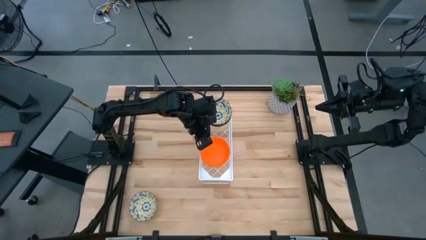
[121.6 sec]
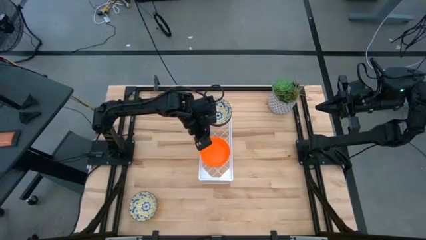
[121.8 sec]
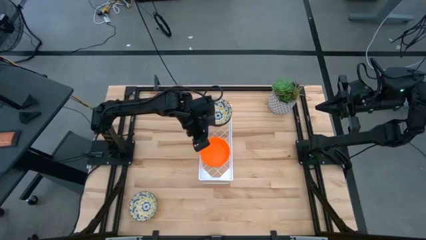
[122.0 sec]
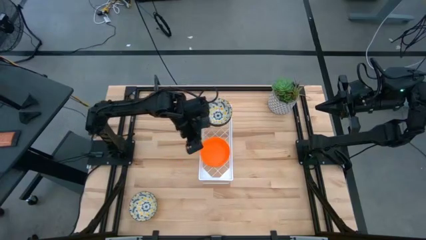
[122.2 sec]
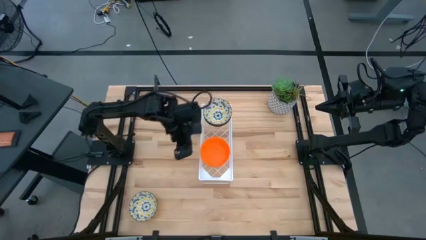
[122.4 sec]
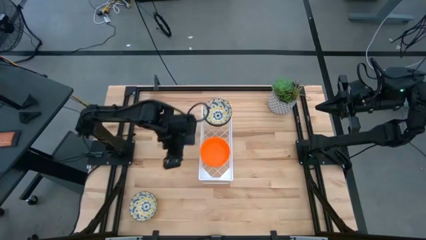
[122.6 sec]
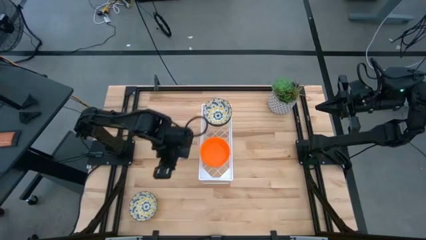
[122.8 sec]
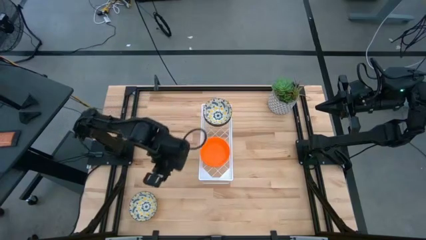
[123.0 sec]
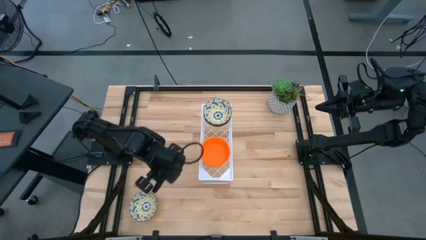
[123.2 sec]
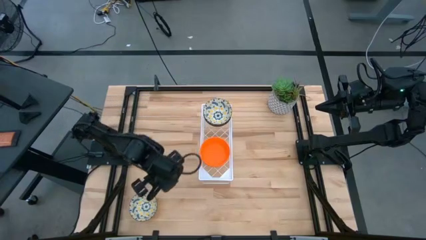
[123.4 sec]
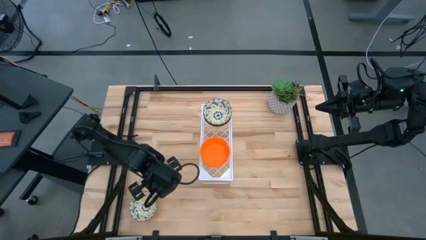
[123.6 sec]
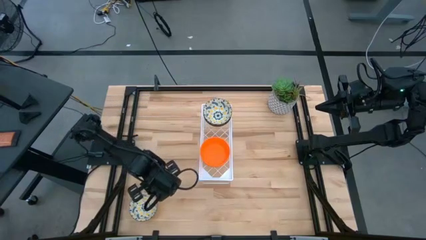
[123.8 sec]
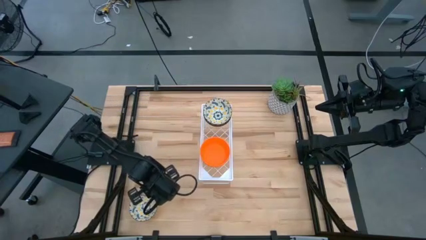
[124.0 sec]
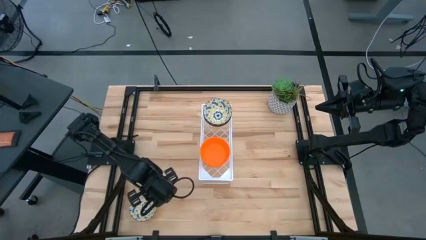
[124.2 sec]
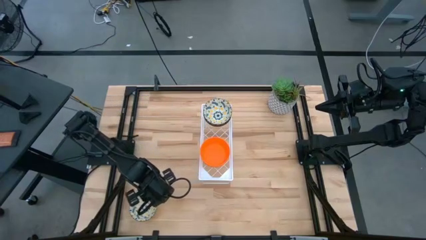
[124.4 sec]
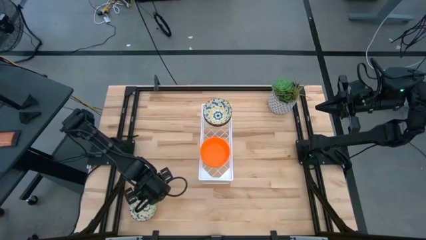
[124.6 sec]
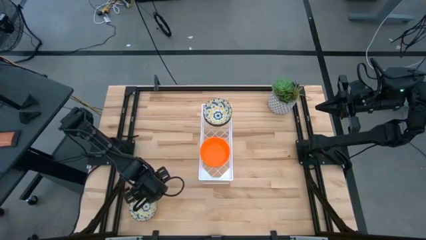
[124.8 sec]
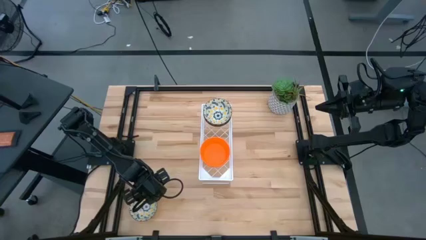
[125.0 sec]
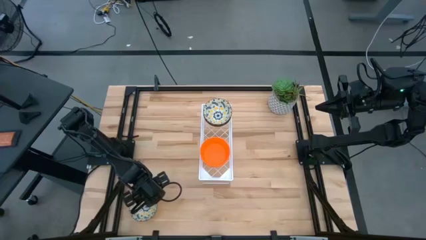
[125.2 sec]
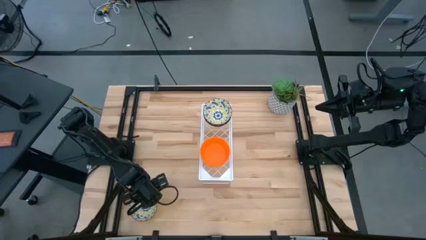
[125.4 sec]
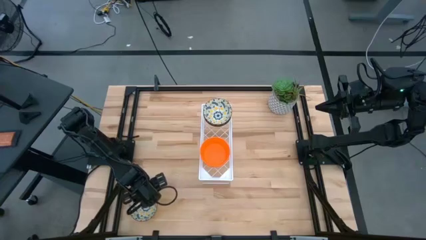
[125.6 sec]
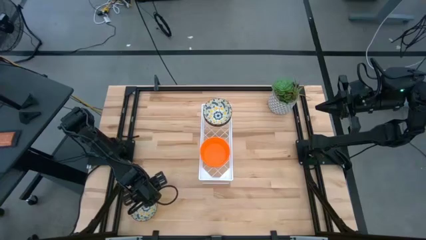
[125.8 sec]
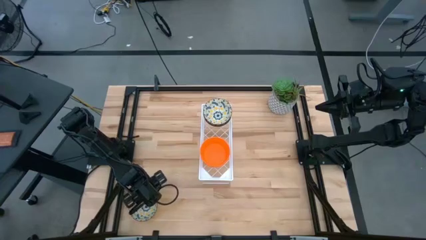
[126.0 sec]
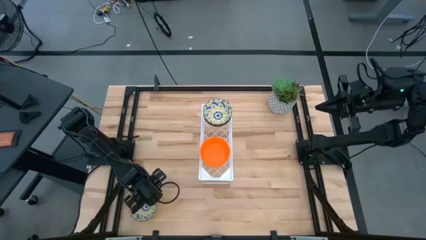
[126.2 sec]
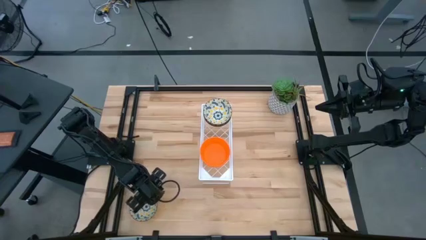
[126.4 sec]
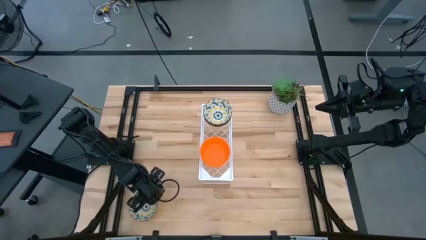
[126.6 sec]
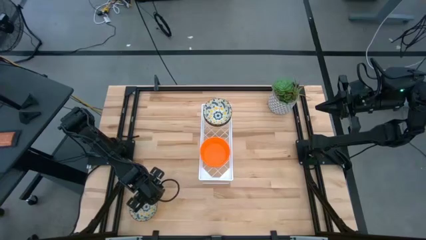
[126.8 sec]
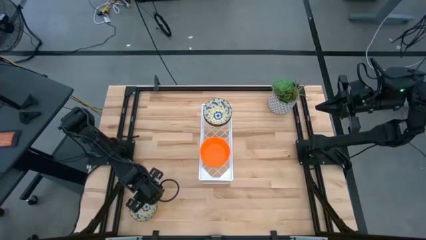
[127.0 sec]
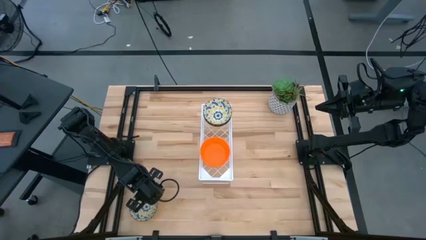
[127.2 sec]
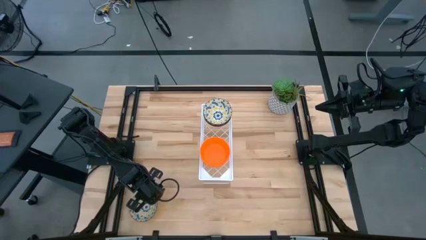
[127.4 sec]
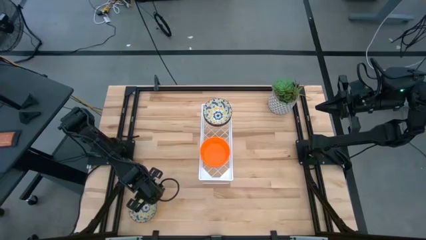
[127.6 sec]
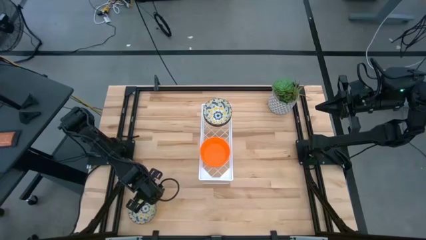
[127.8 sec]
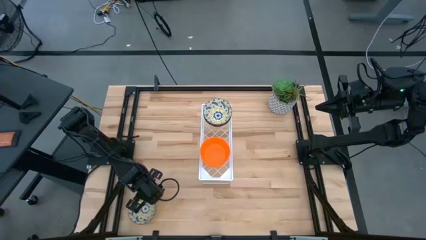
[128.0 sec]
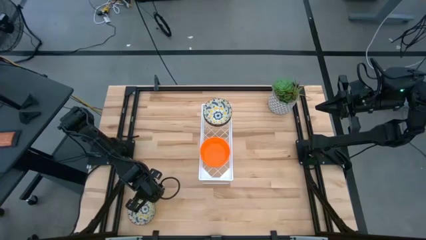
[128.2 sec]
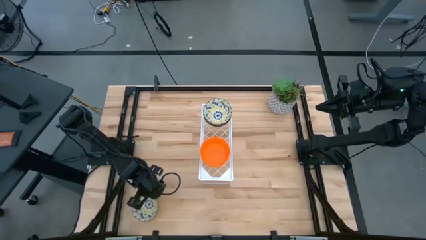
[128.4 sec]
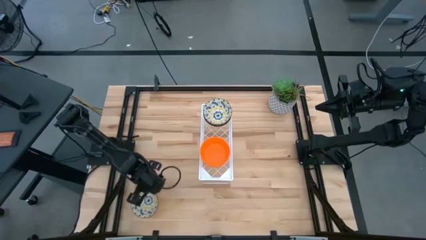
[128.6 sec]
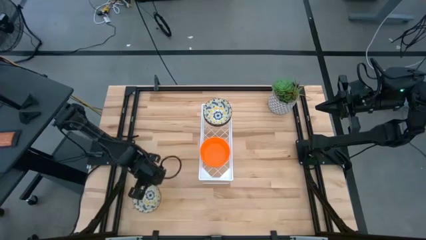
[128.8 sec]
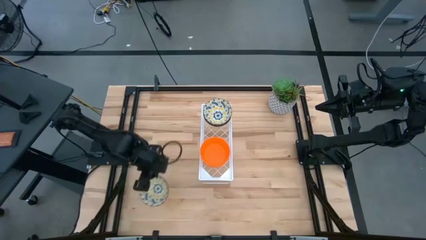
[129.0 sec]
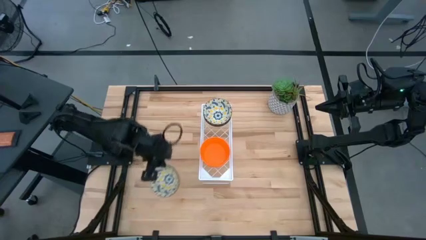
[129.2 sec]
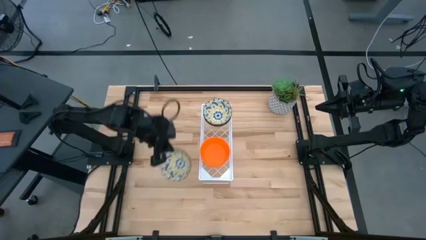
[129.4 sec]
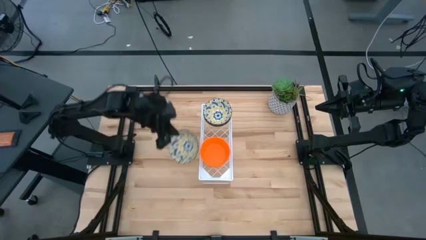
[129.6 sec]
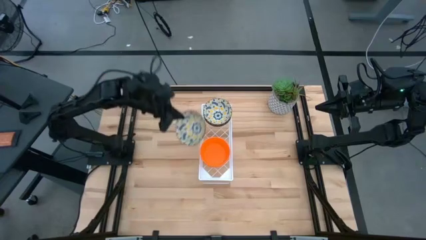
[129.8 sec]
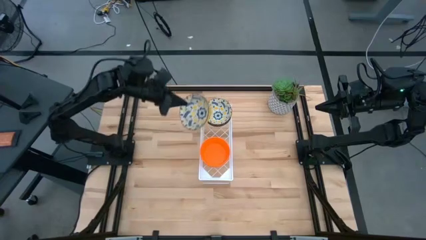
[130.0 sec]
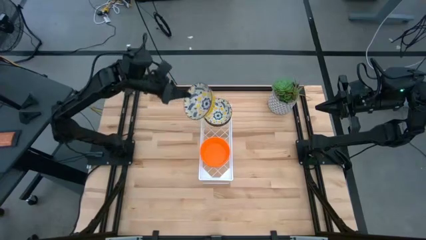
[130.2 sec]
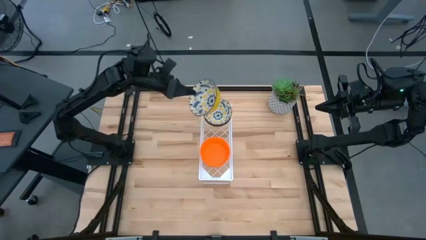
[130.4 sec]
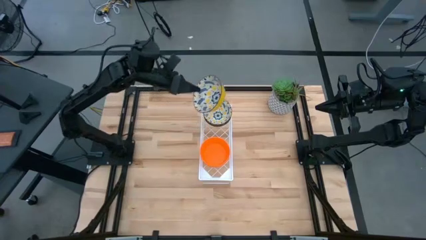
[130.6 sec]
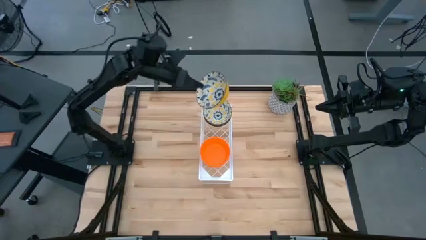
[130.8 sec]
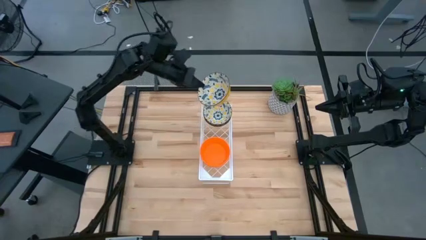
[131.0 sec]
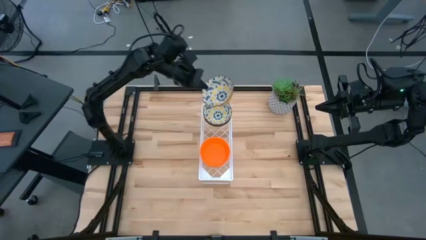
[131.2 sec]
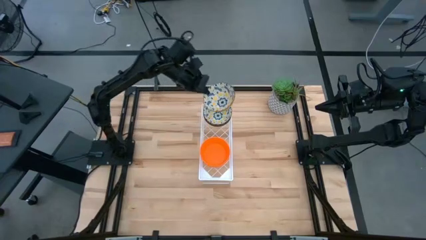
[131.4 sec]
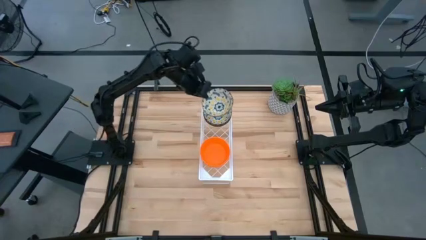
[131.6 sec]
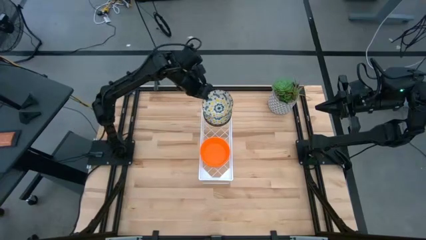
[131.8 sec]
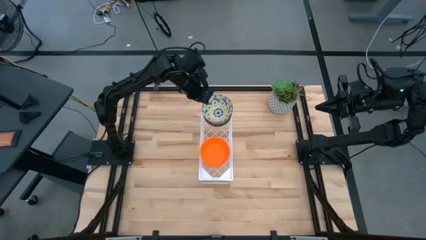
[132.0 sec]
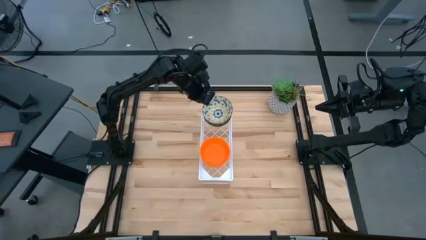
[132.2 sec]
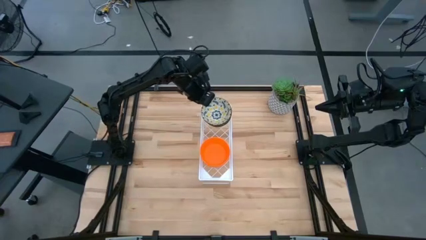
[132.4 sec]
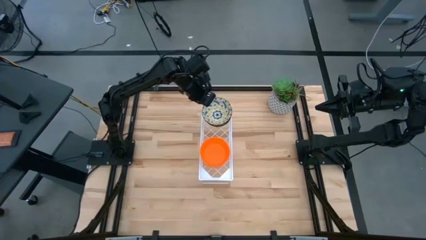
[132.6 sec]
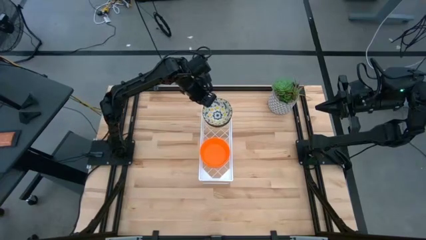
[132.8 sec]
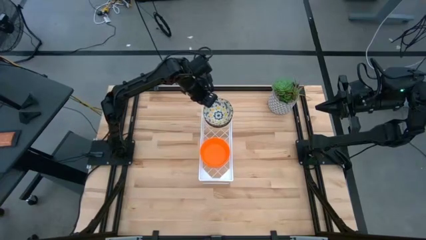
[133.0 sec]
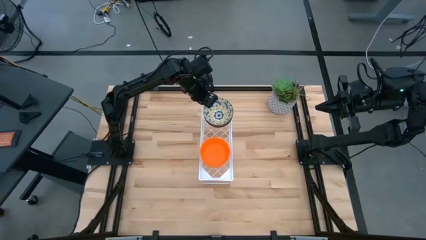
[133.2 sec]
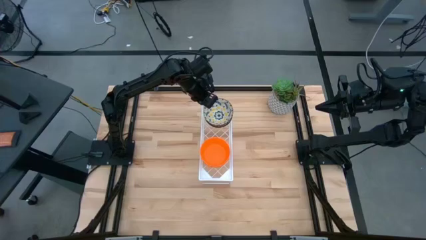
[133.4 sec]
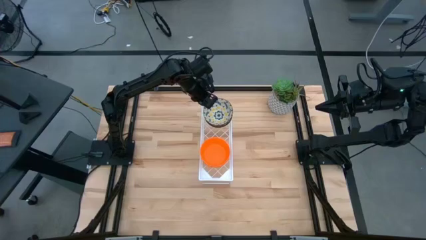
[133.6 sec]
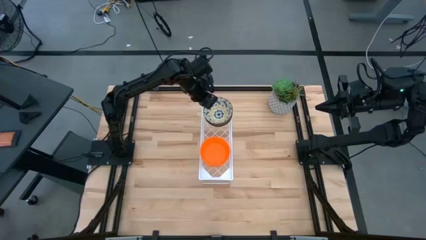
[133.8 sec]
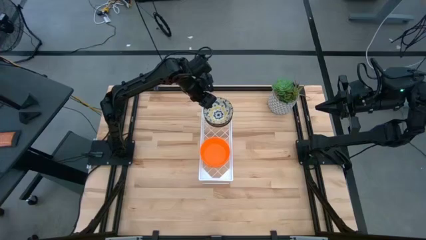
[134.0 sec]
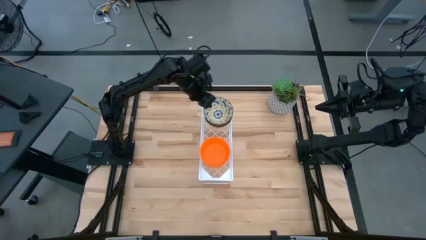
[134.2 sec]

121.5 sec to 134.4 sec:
Task: Pick & Place Mini bowls
Stack the yellow patterned bowl on top of the yellow patterned bowls on the shelf

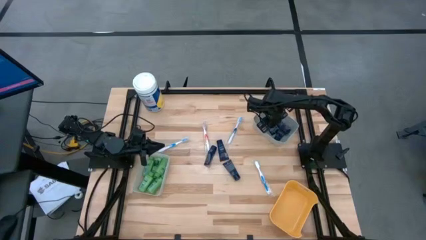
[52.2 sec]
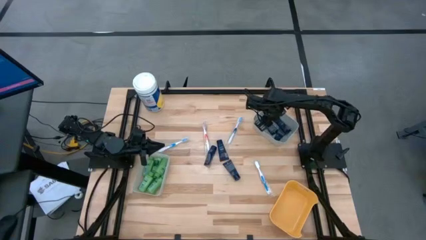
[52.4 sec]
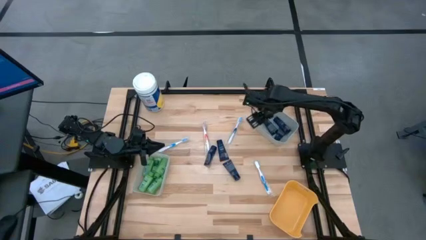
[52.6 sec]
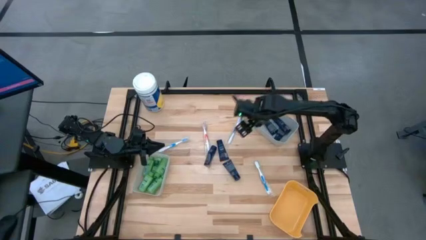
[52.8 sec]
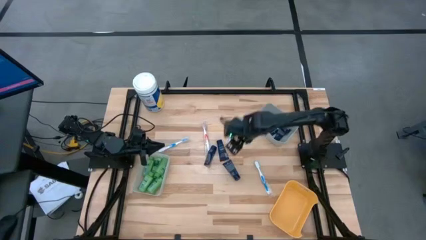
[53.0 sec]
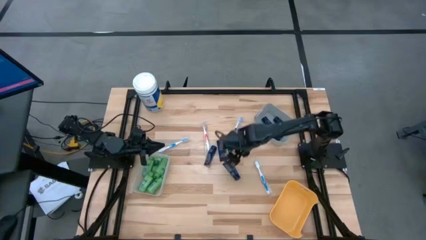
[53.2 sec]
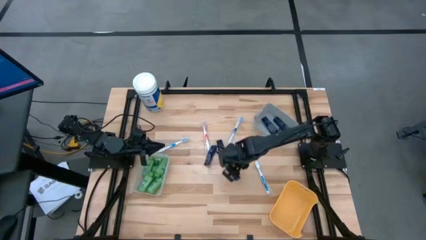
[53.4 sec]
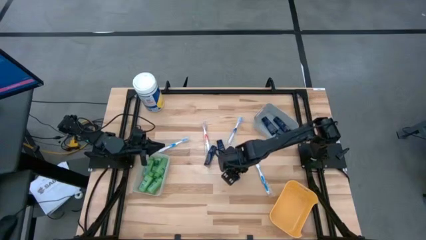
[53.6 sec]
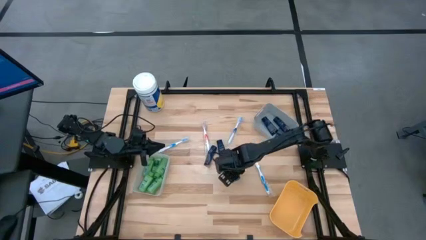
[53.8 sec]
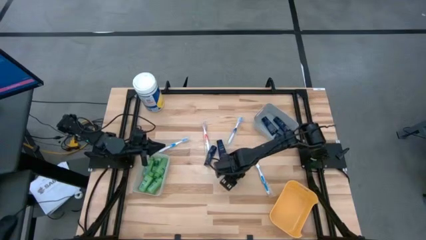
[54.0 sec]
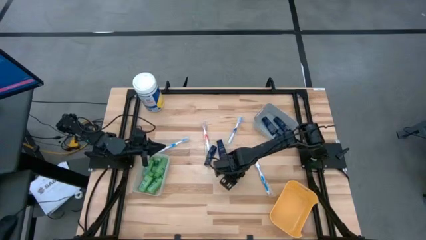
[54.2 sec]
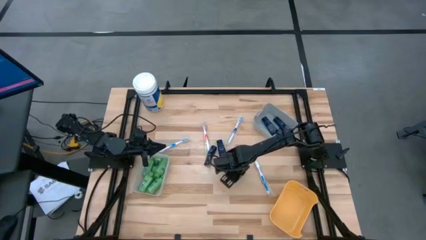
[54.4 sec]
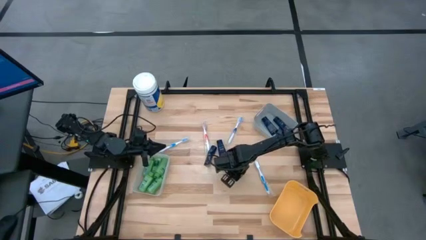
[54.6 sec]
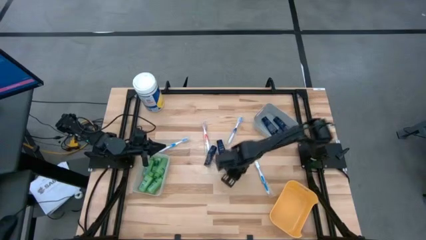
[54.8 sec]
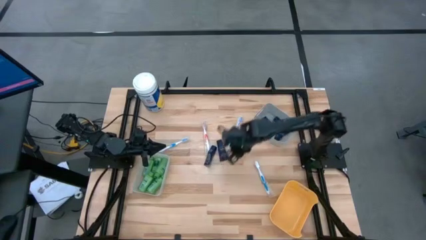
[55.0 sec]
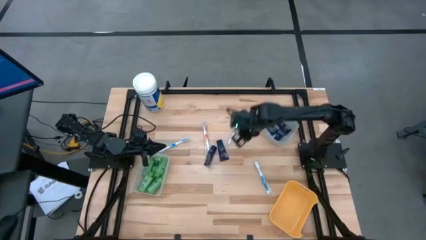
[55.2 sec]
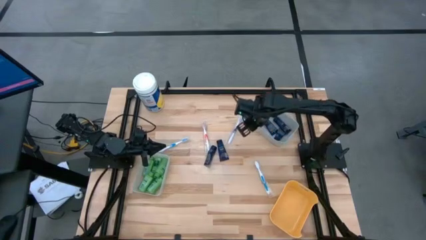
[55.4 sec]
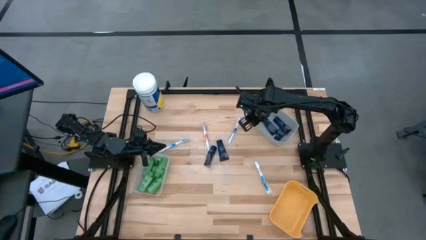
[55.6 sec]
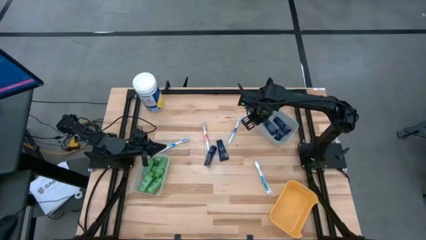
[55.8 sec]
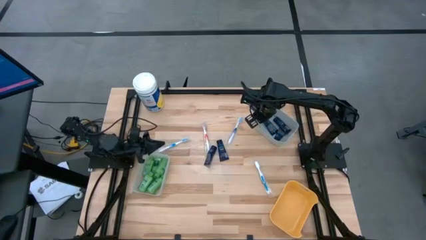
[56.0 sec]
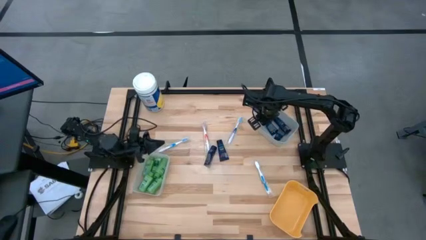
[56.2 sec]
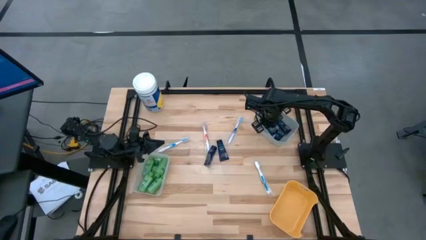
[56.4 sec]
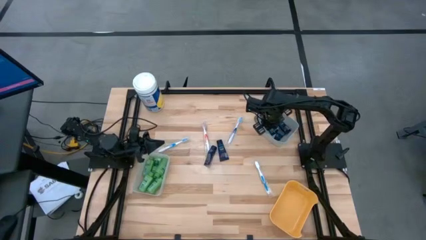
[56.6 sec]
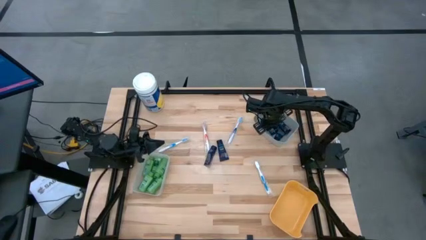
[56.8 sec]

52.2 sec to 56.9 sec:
Task: Pick & Place Travel size toiletries
Put the blue shave cream tube into the gray bin
